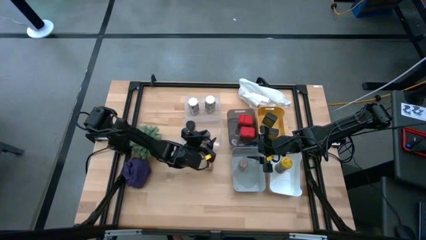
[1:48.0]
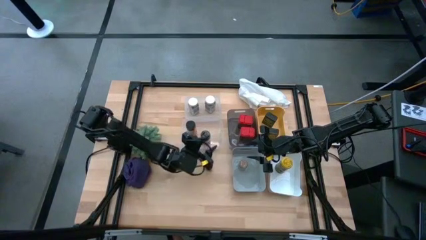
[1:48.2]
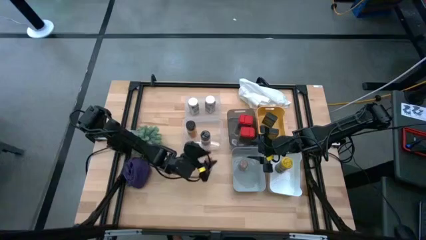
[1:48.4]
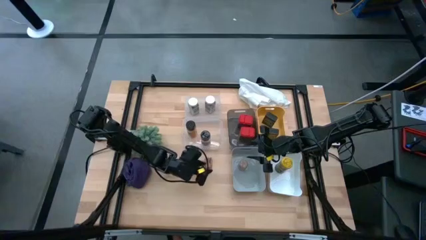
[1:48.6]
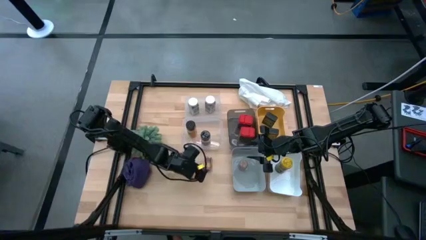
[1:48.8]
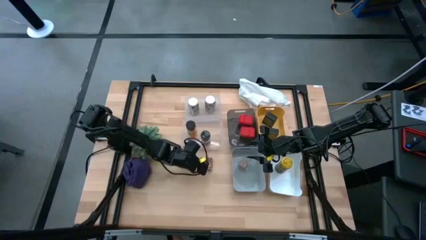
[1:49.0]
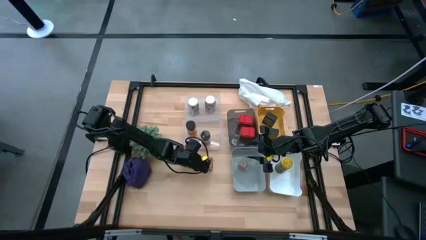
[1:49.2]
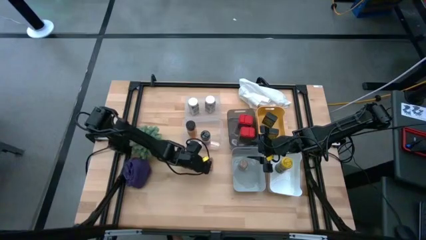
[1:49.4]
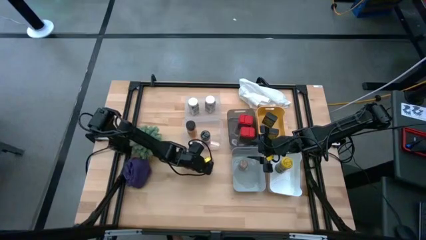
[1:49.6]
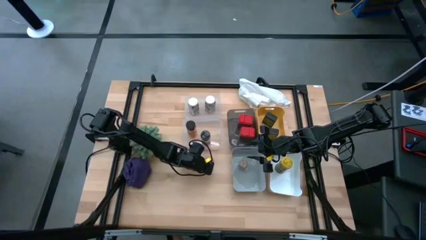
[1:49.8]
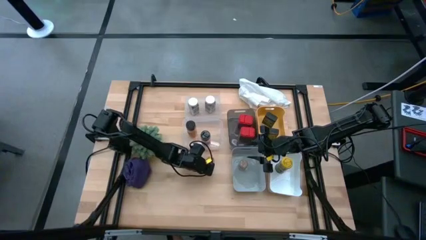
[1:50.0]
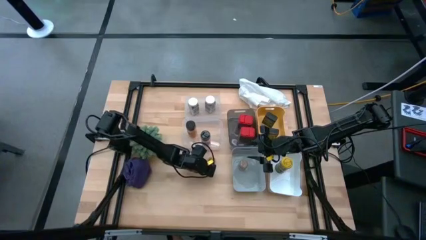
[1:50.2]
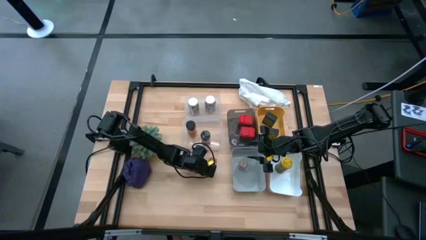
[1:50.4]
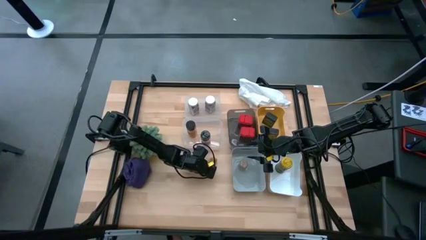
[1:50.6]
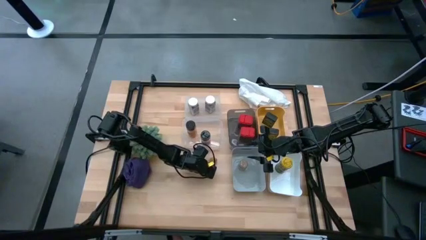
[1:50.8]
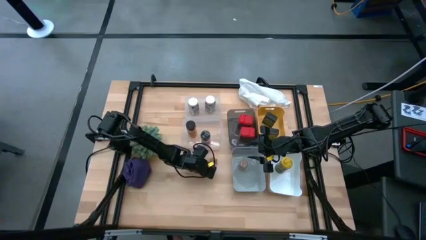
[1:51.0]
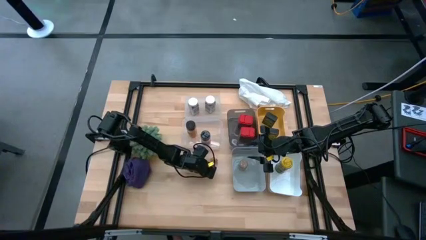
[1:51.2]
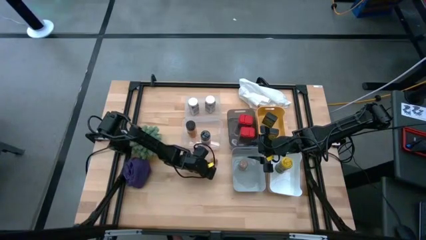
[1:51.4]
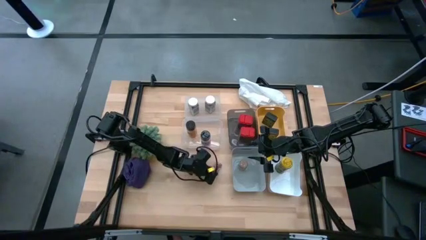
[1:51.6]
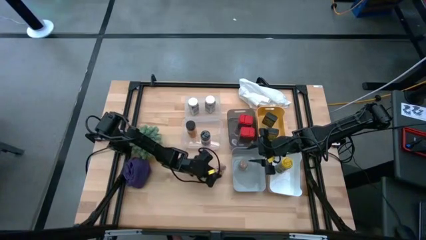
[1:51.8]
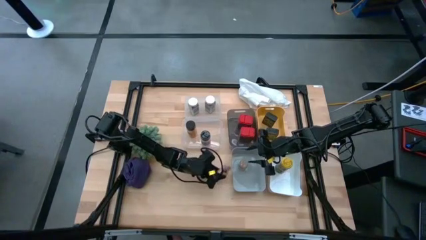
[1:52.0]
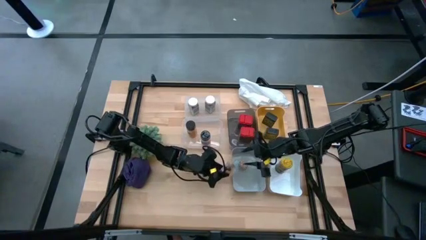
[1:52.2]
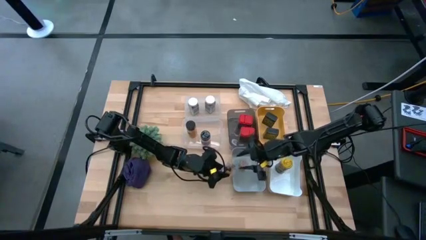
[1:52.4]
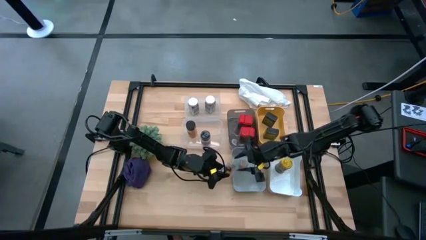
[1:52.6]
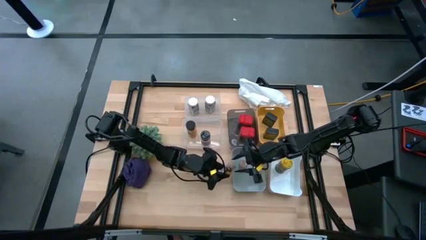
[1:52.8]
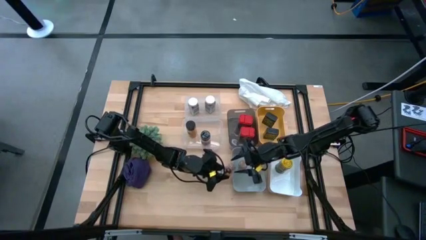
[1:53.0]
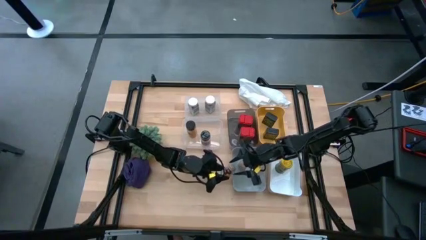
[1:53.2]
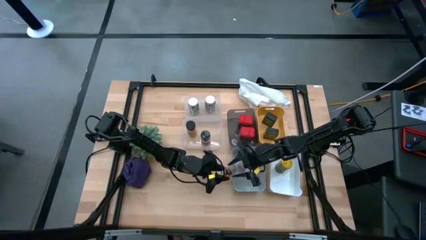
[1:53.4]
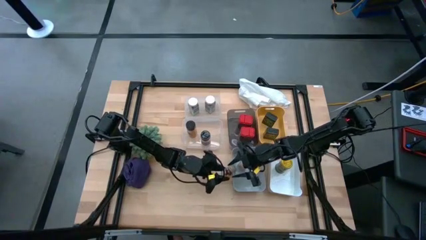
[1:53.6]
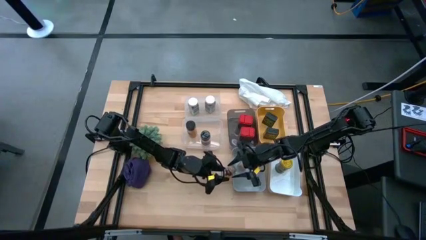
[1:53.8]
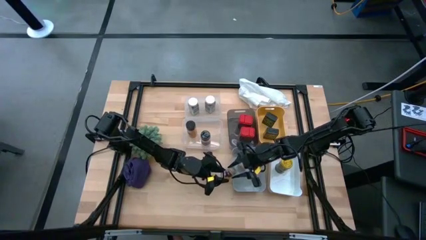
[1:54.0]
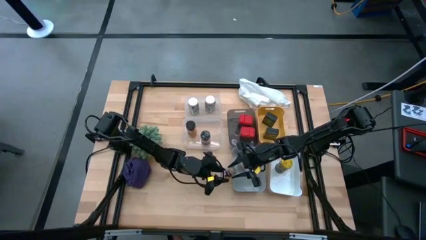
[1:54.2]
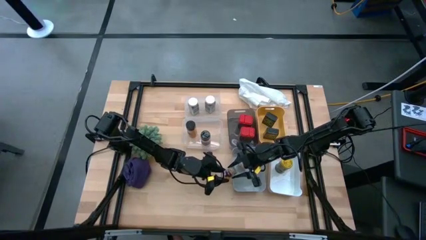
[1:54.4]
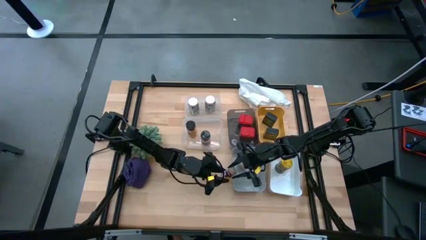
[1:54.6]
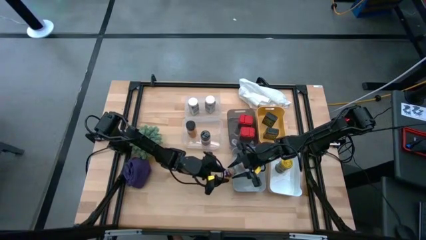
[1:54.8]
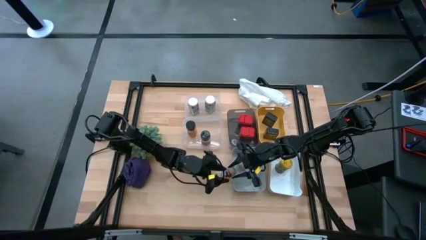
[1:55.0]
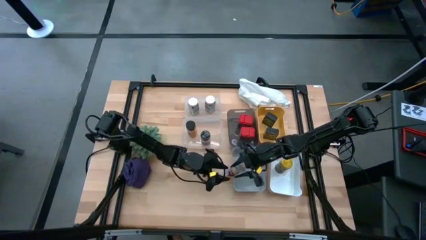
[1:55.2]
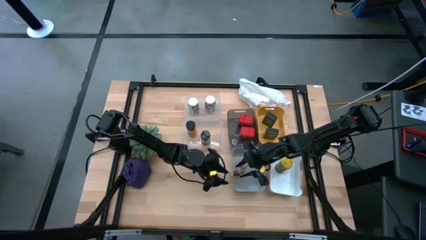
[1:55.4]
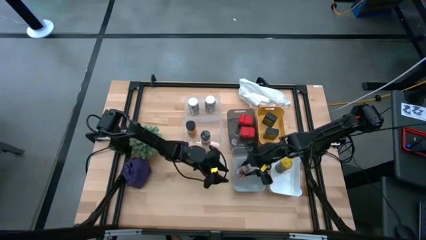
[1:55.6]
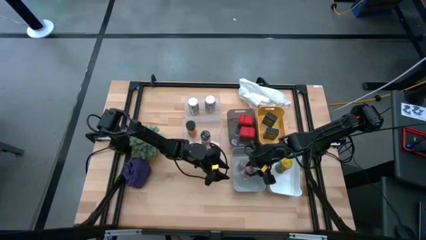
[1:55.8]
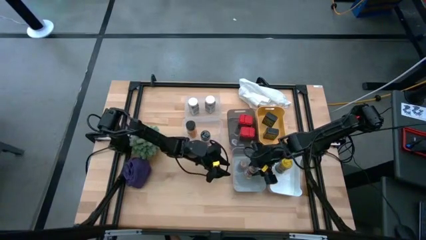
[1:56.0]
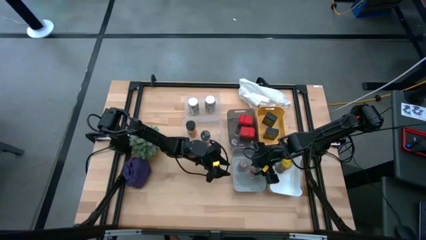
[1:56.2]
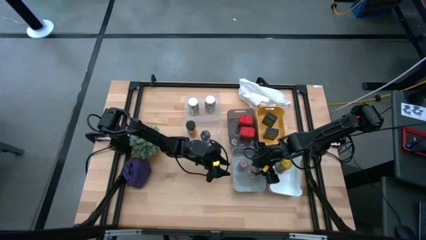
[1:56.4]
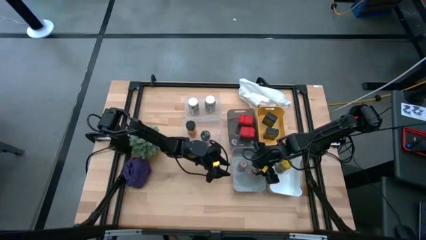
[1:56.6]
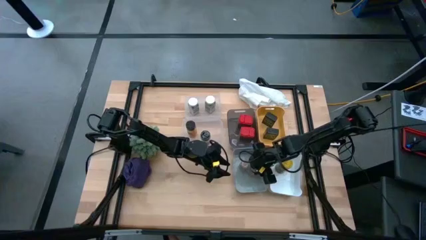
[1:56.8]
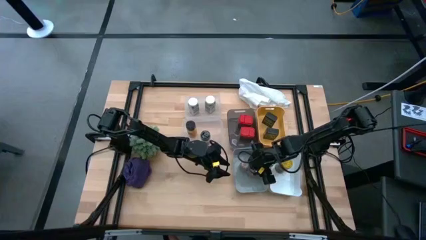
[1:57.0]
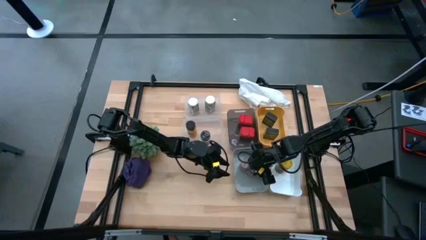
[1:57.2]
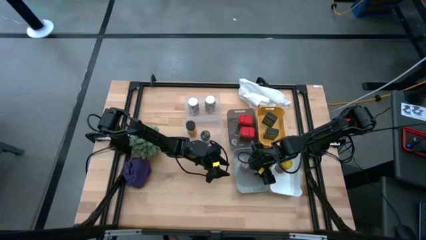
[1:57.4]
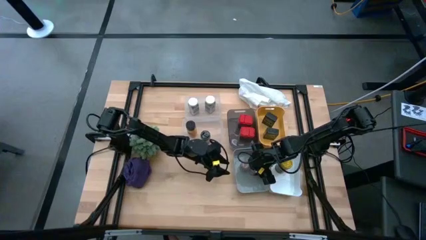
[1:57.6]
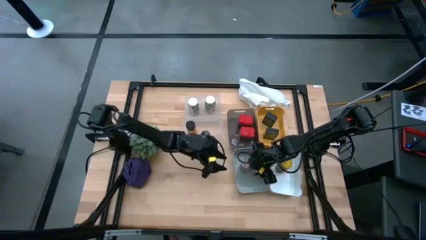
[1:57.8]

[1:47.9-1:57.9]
Task: Sort spices by type
Put the brown seasoning bottle into the gray bin

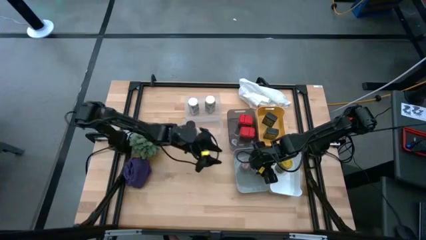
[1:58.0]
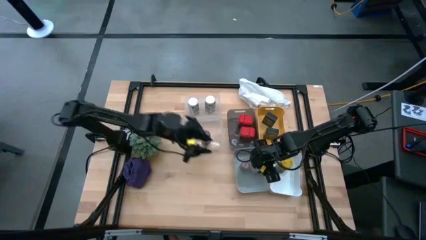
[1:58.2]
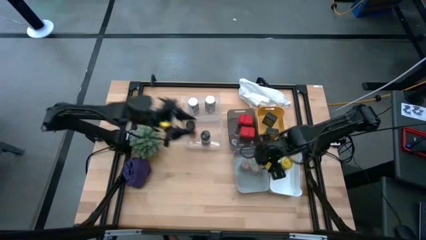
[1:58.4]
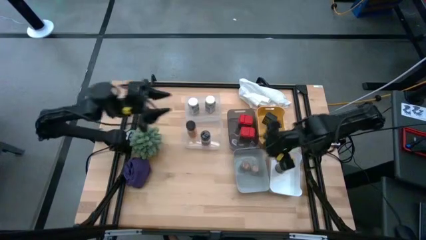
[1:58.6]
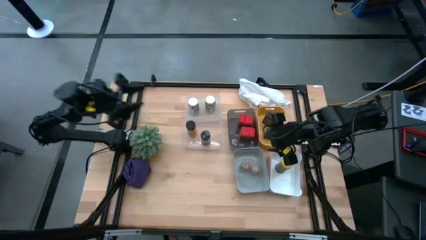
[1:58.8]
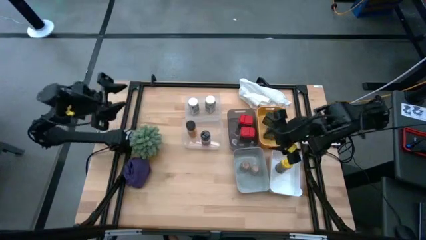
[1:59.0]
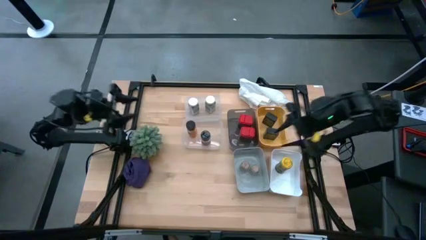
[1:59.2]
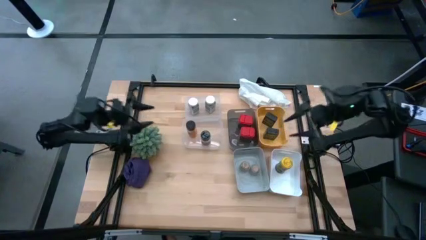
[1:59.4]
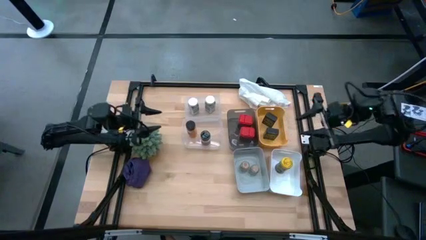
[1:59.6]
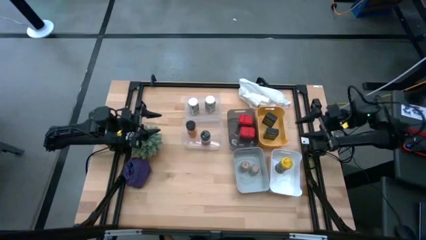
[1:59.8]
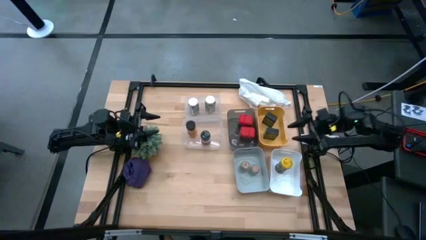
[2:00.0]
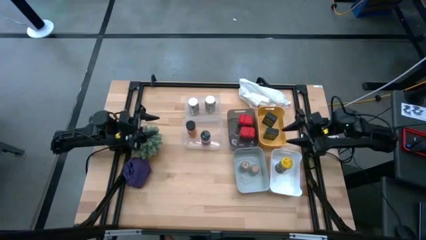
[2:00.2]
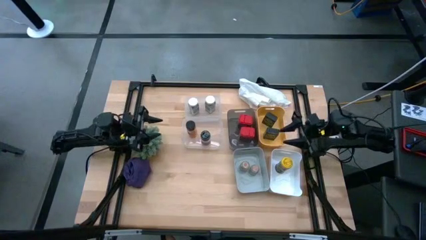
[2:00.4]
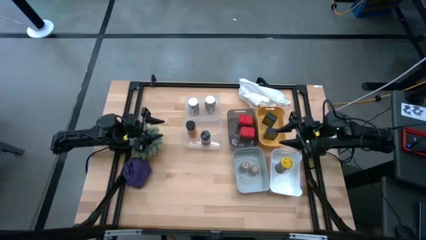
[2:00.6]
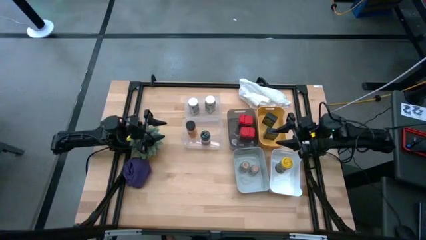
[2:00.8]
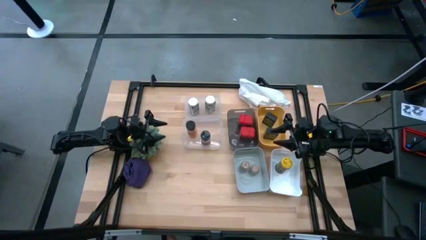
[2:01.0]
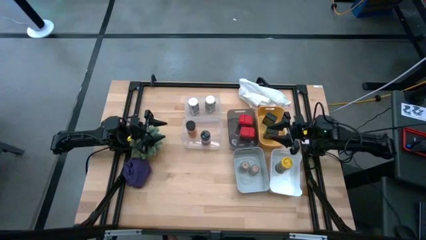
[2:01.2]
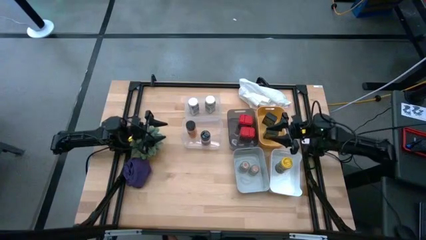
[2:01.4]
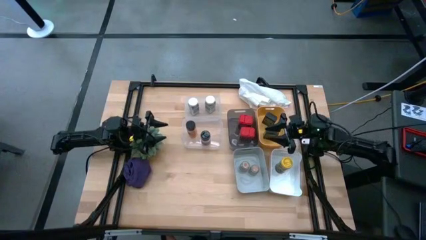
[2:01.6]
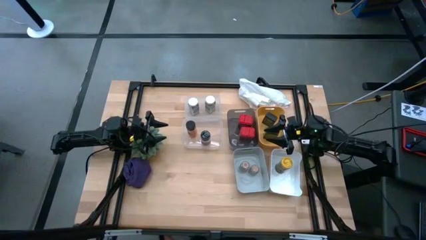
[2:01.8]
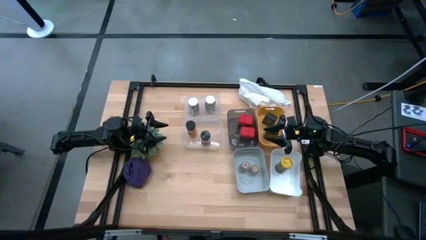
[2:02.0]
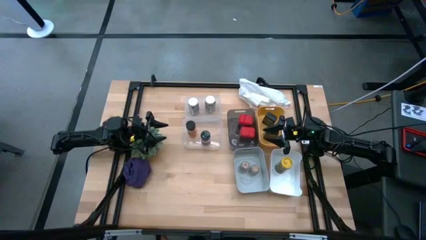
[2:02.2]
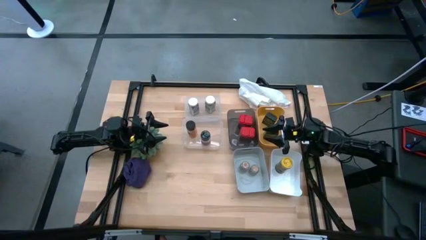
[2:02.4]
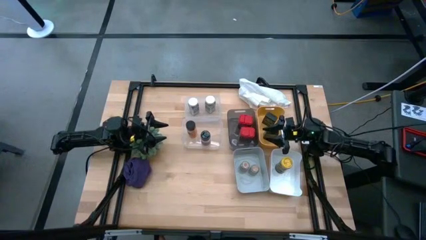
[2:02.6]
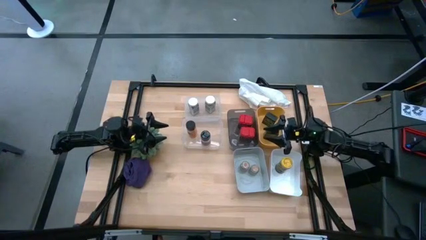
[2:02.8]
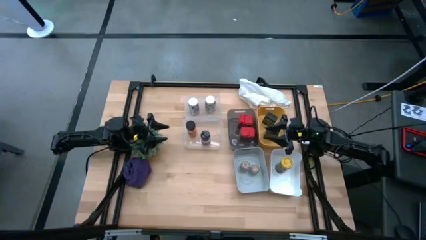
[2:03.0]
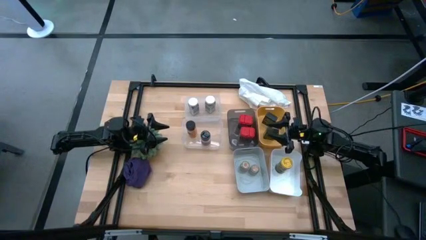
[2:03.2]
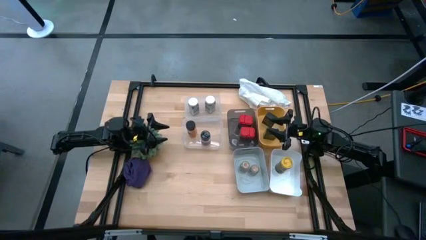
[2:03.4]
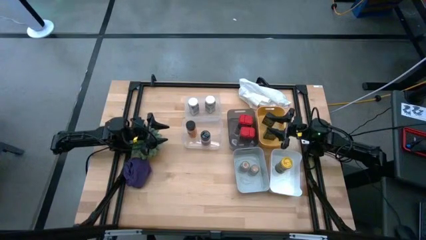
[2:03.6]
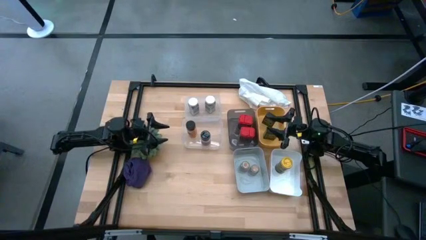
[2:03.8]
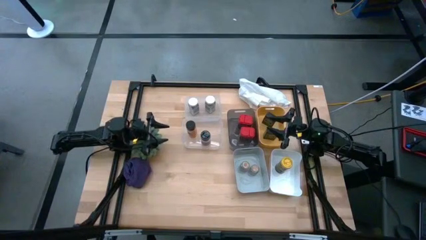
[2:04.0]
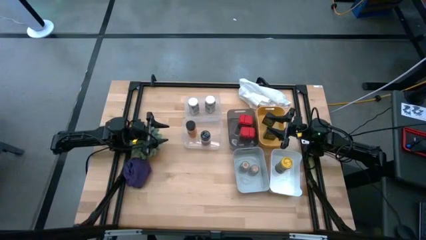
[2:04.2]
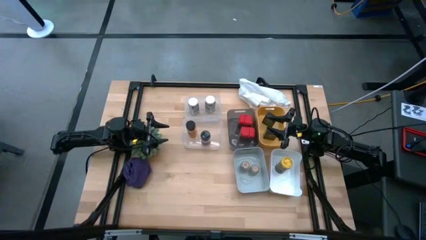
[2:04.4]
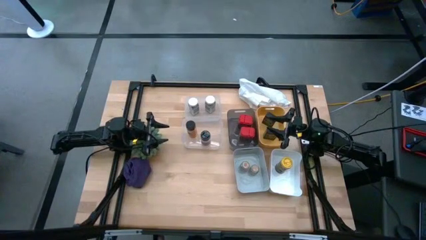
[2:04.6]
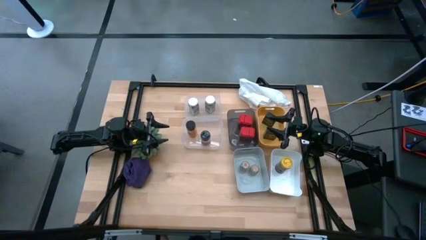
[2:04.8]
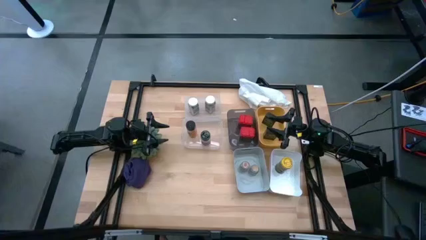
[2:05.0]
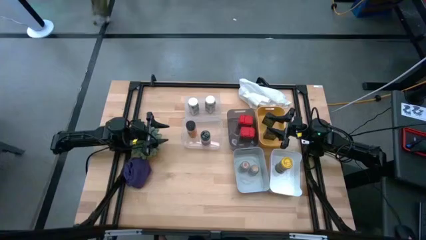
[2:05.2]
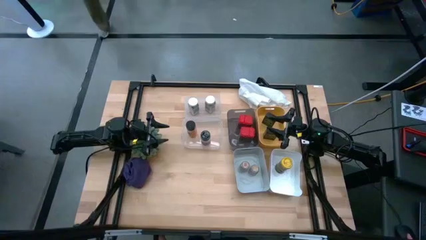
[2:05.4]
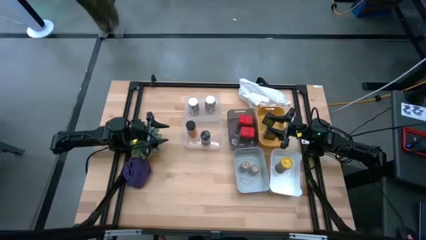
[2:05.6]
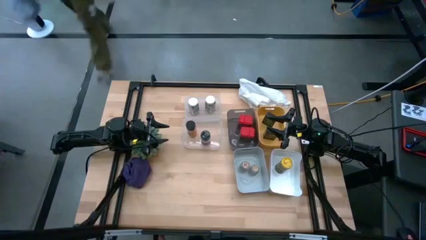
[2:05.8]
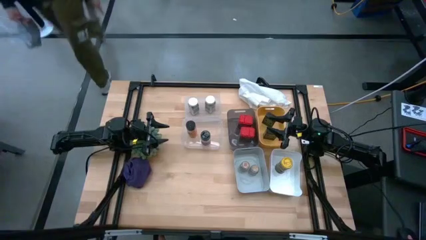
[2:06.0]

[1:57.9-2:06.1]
Return to Home Position
